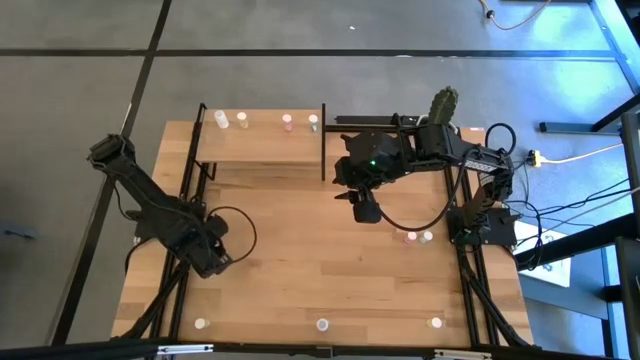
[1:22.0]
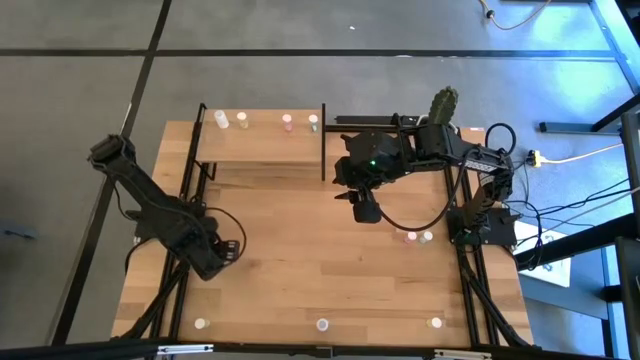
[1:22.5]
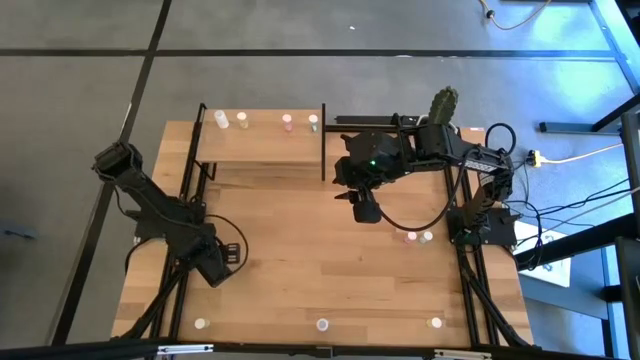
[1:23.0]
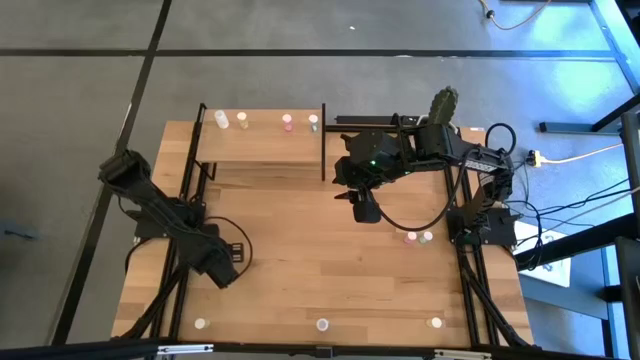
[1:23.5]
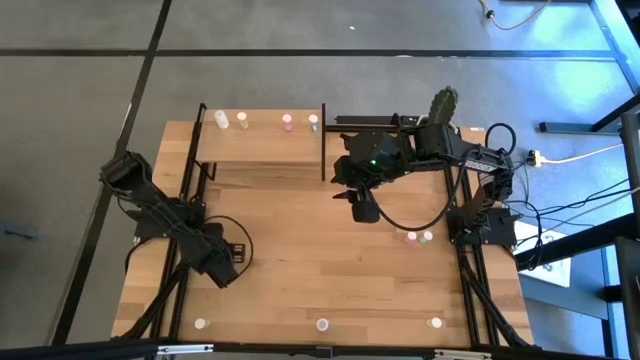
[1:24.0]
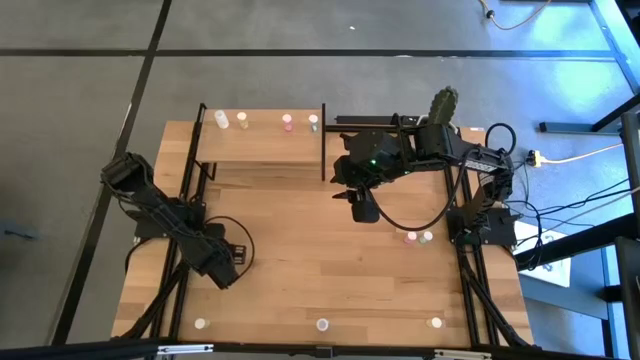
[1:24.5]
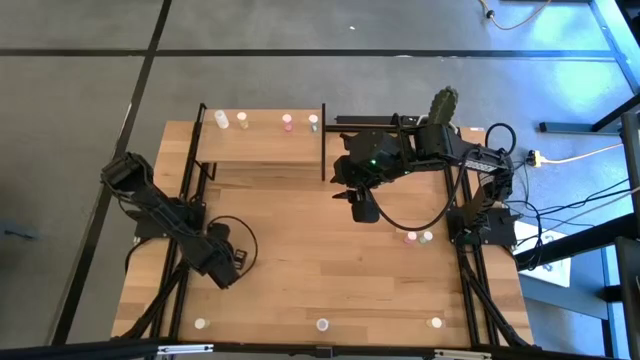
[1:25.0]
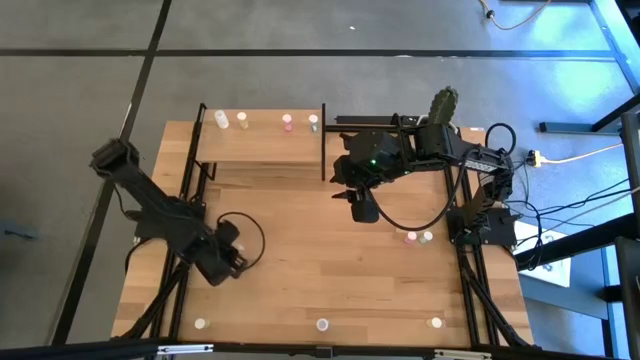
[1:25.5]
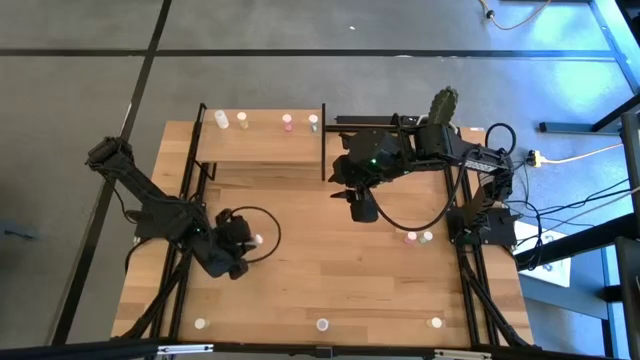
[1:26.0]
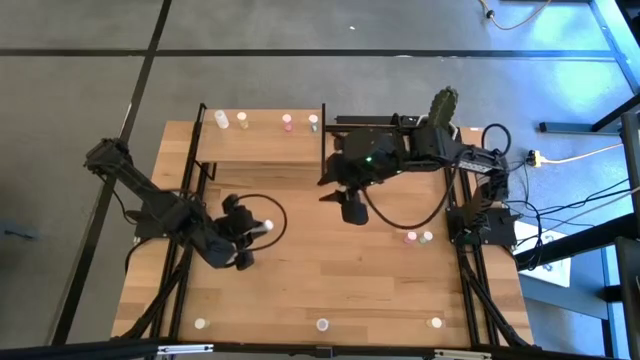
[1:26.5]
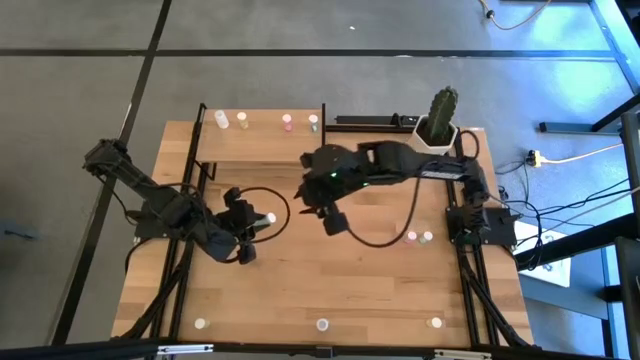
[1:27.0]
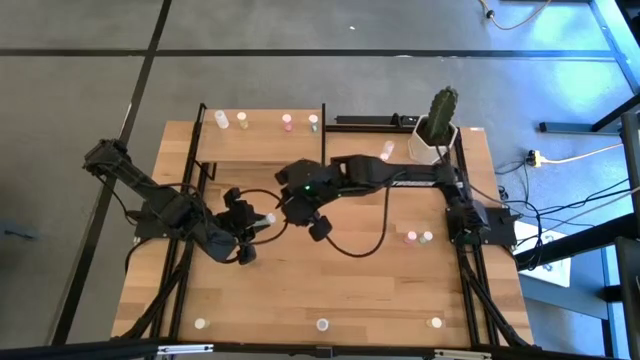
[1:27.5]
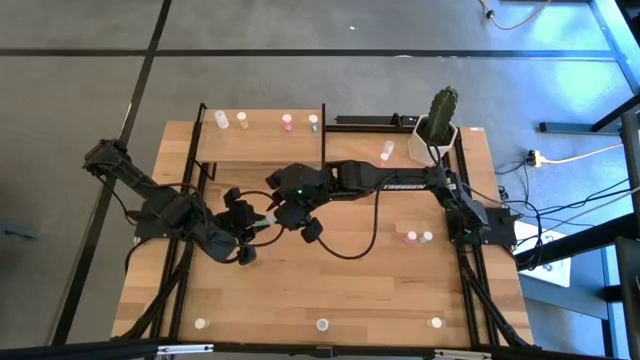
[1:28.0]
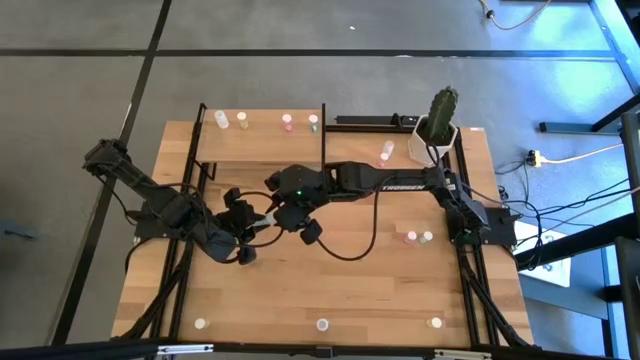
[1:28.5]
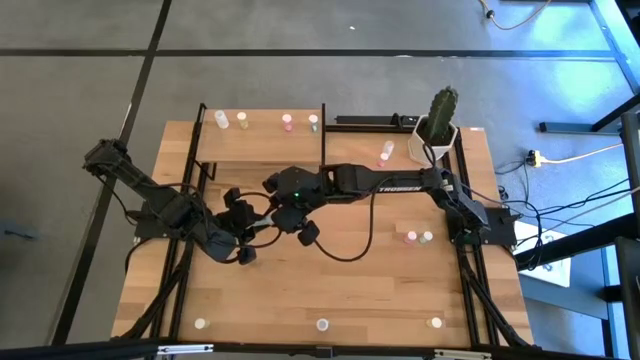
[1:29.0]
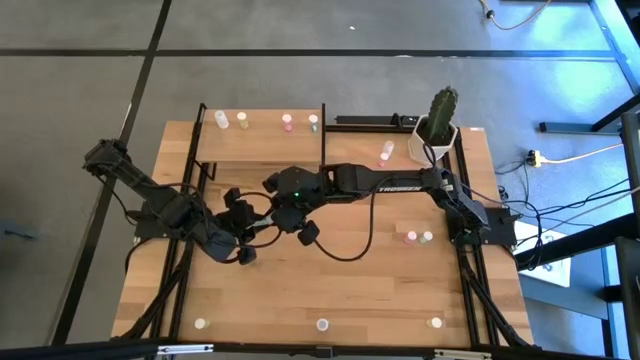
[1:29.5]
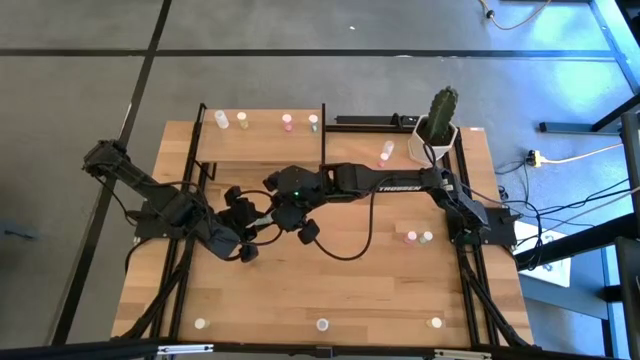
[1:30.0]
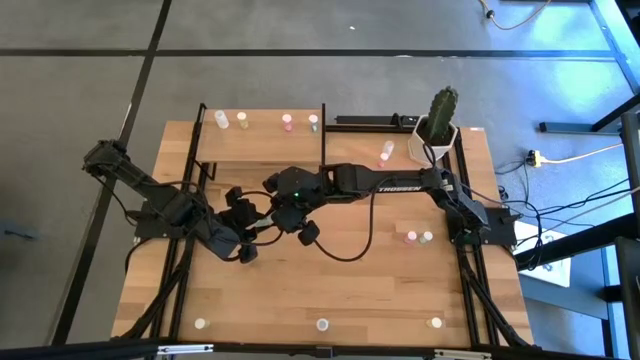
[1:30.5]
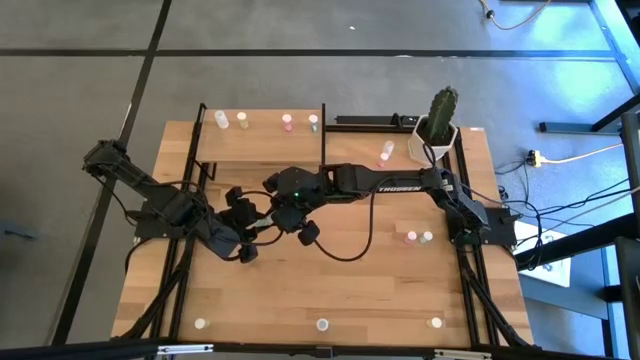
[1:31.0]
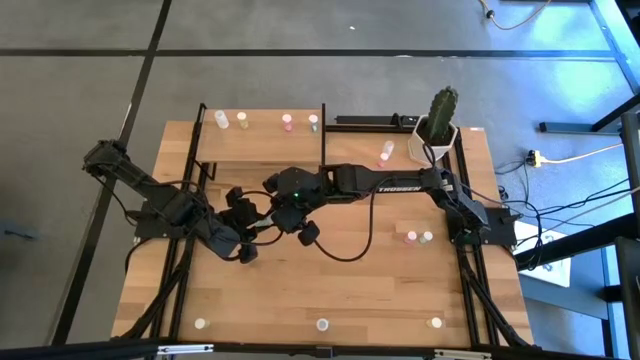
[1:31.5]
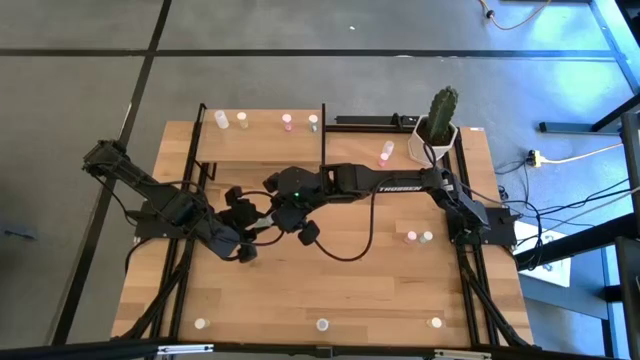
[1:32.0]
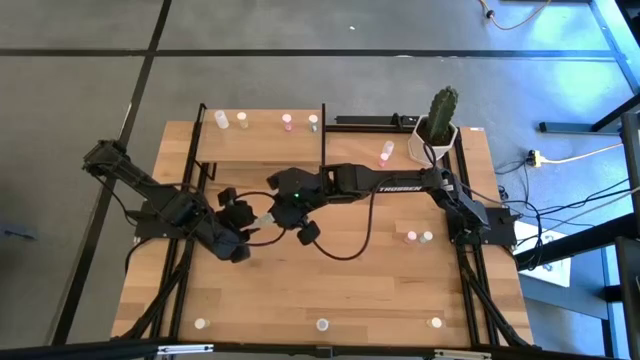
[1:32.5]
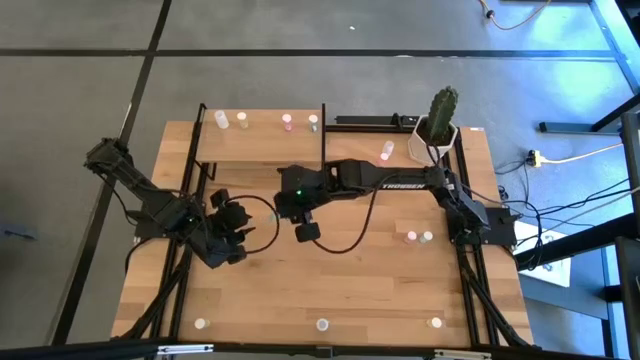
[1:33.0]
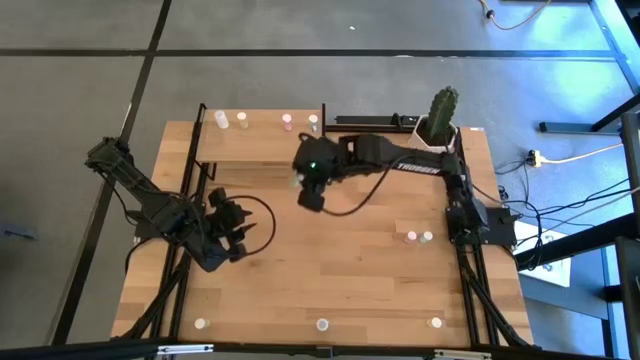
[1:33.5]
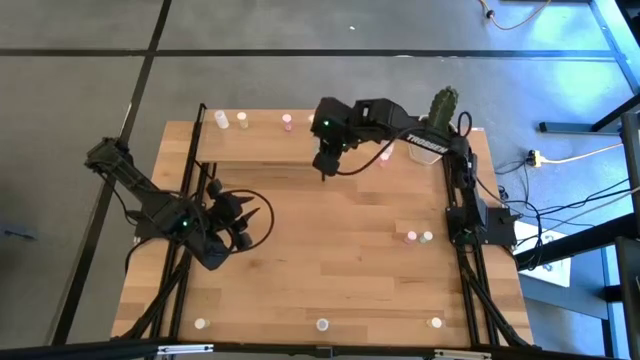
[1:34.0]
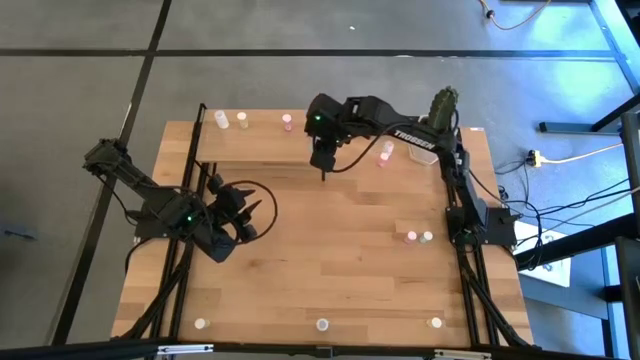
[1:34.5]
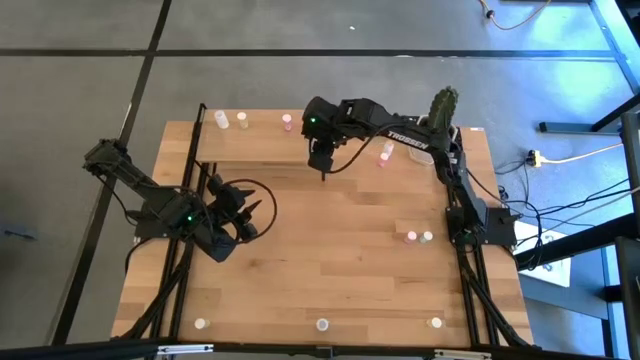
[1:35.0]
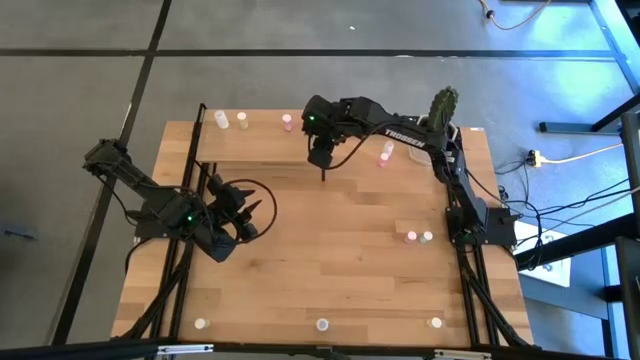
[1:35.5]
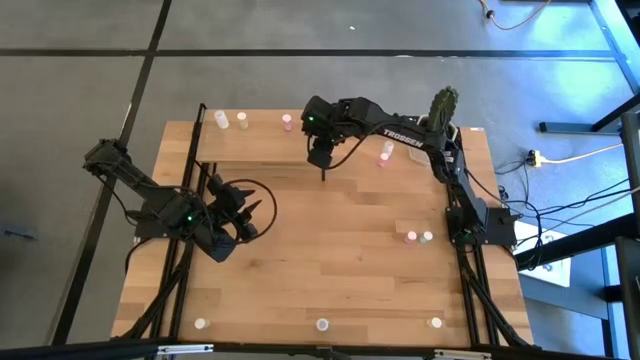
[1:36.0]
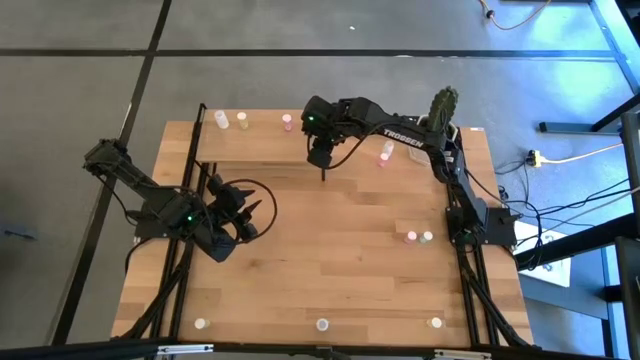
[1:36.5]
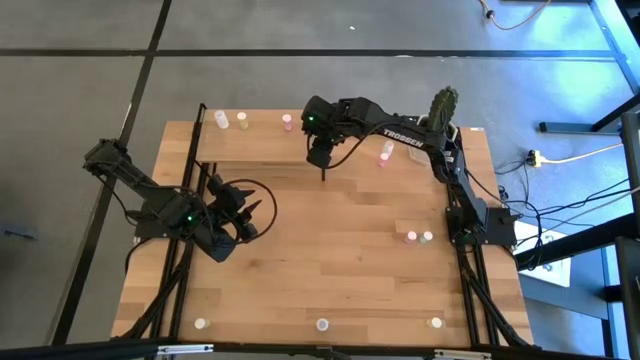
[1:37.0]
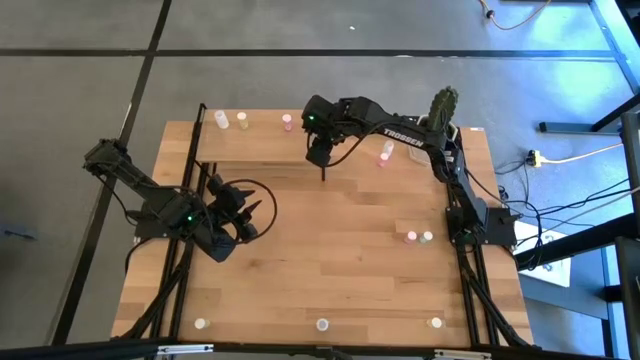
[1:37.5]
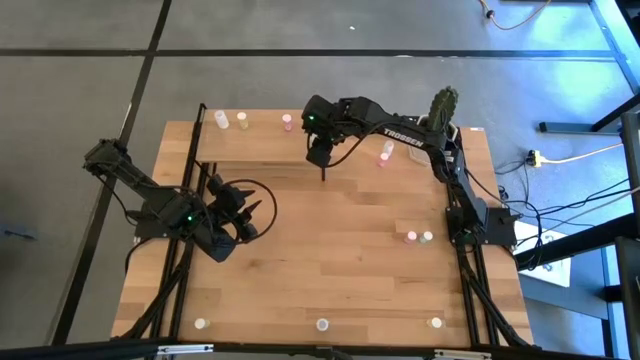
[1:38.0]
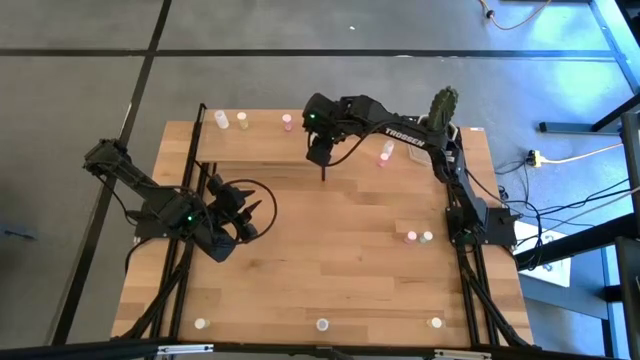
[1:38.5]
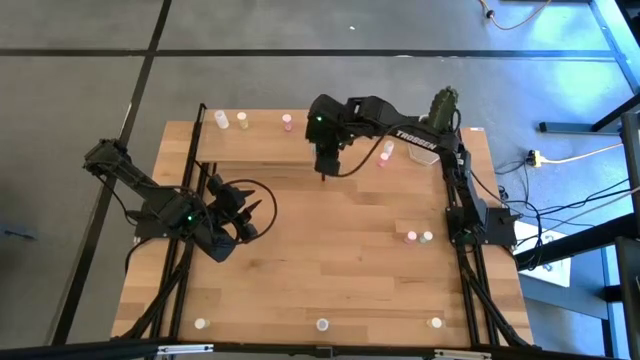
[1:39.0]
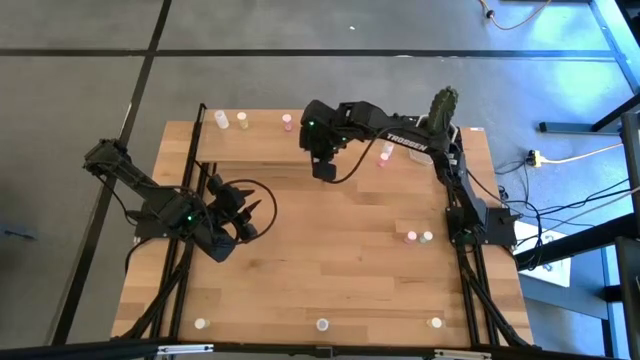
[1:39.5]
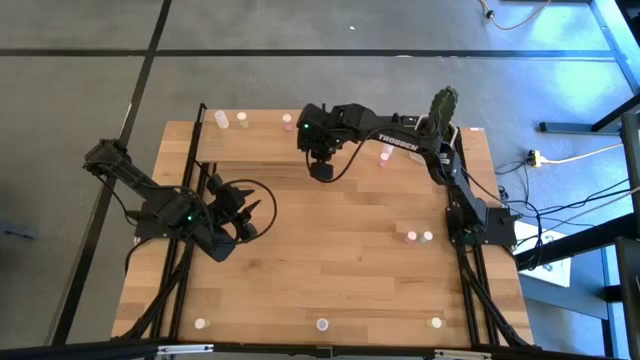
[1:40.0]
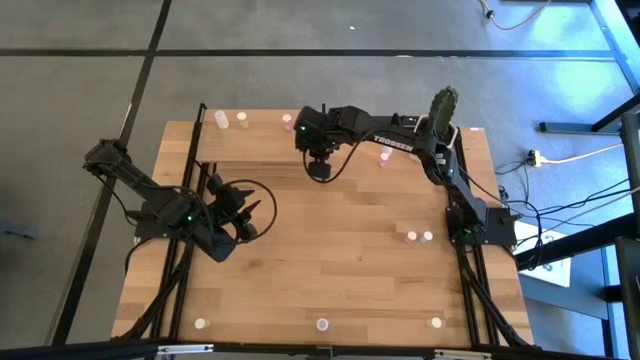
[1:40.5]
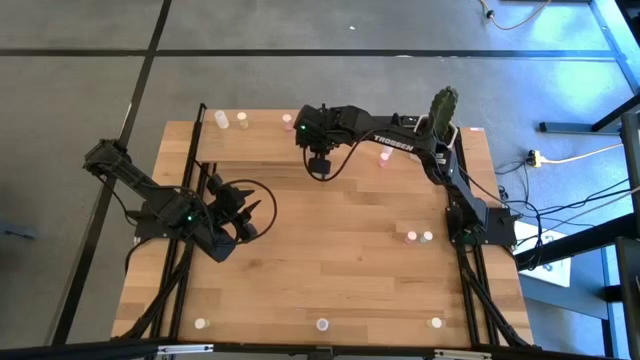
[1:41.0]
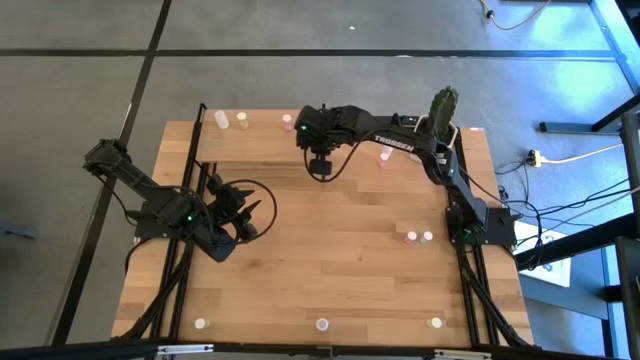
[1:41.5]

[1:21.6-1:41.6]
Task: Pick and place medicine bottles onto shelf by color
Put the left green pill bottle on the shelf and align it with the other green pill bottle

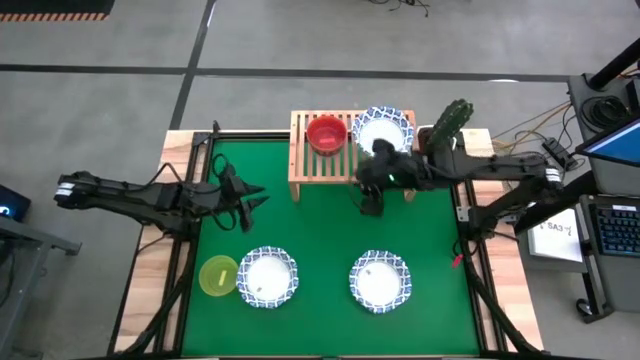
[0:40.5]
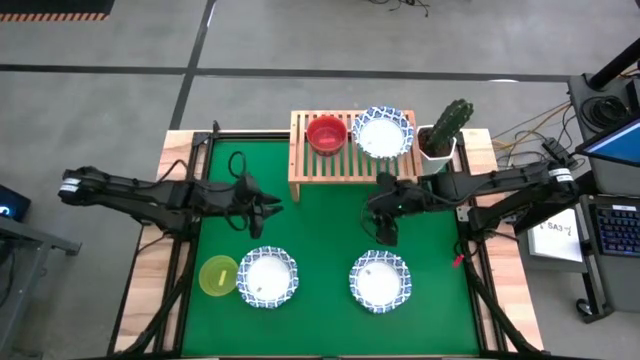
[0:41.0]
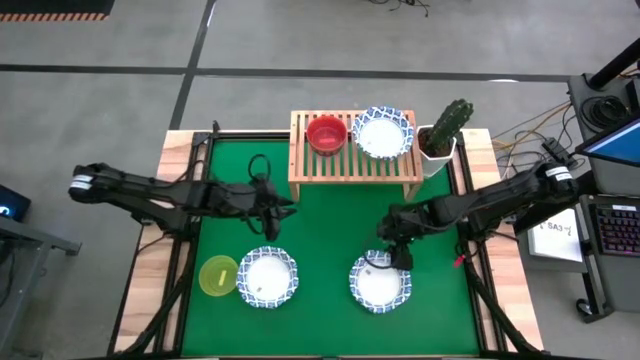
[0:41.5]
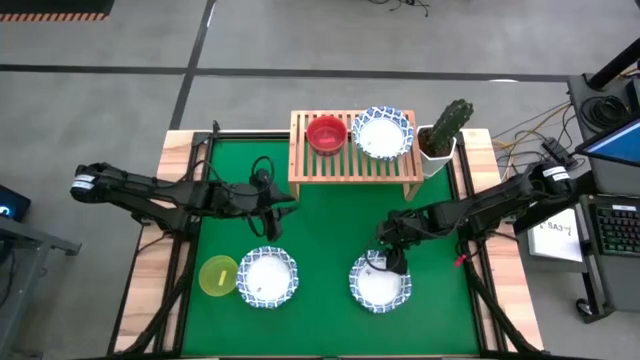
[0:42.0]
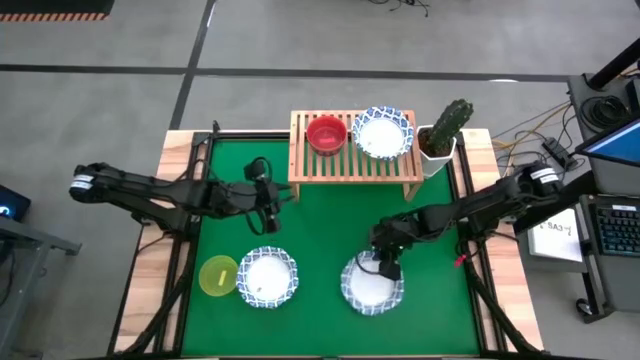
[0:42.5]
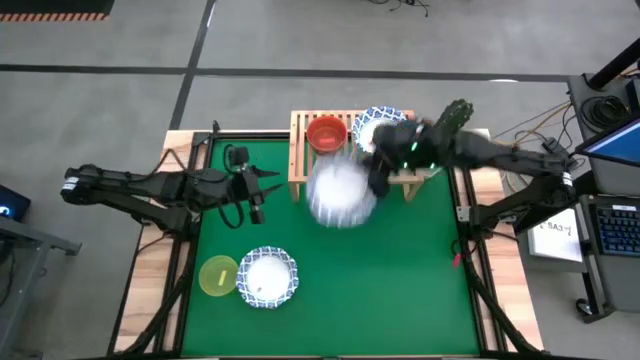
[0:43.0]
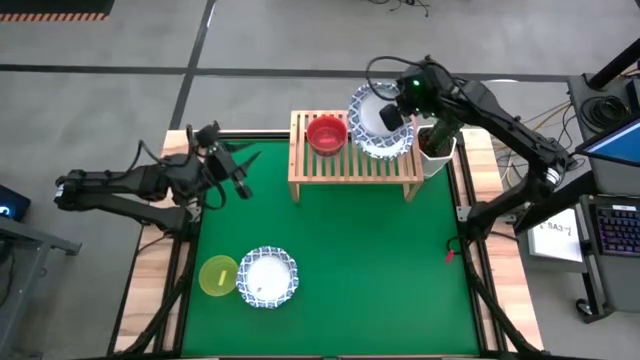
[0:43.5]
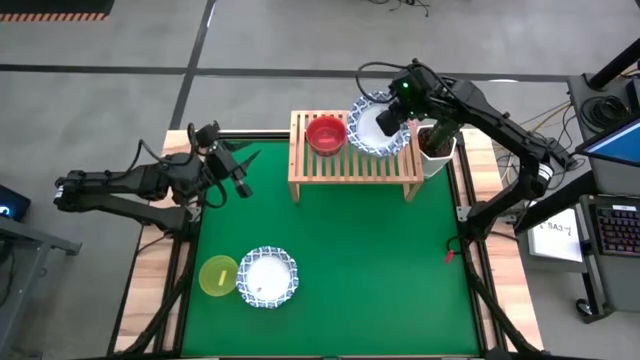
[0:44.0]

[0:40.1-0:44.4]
Task: Place and stack bowls onto a shelf
Stack the big white bowl on the big white bowl on the shelf
